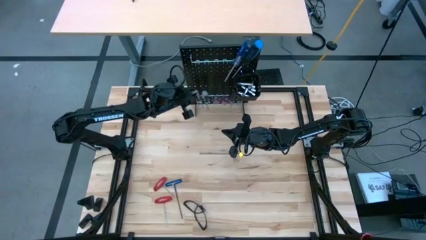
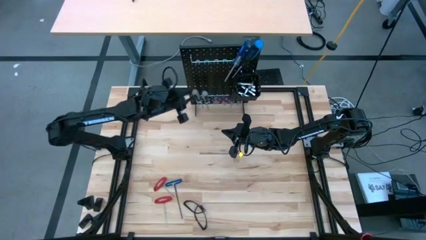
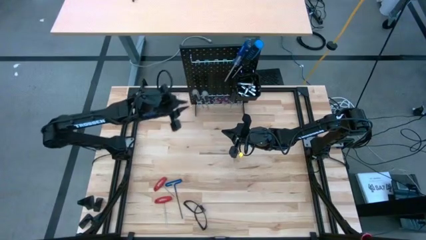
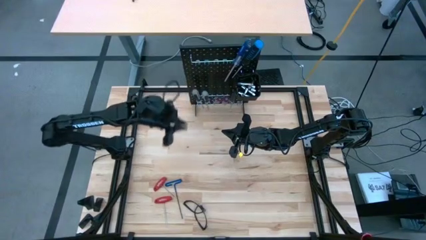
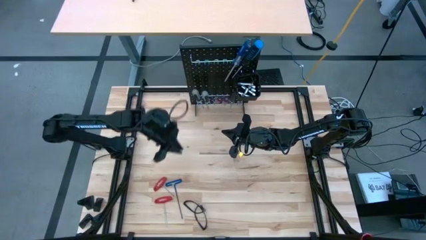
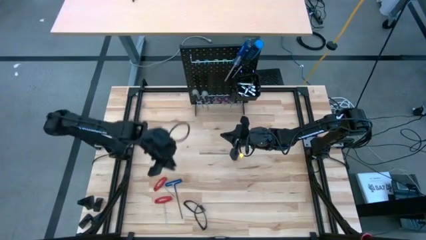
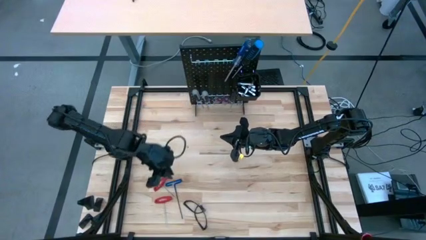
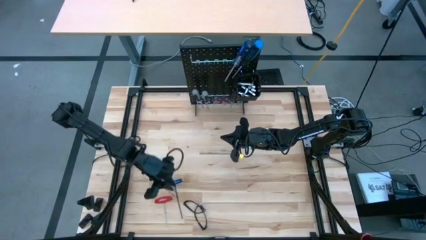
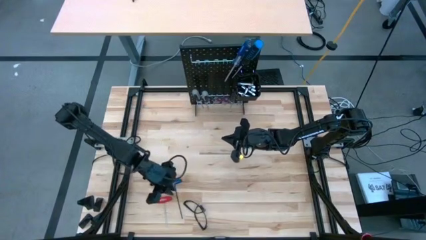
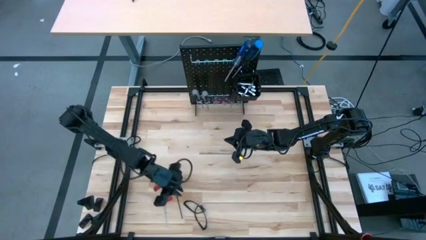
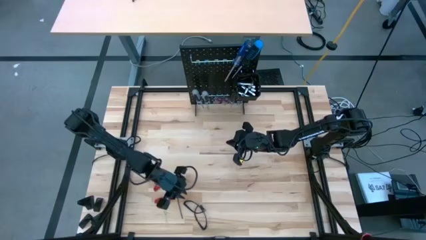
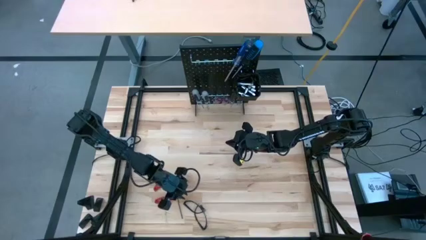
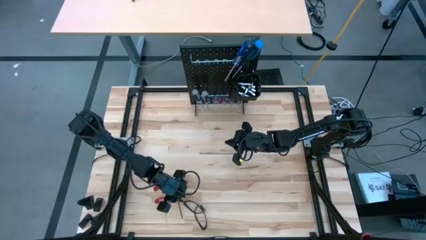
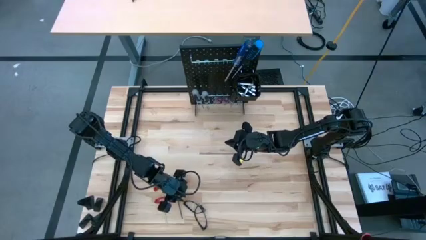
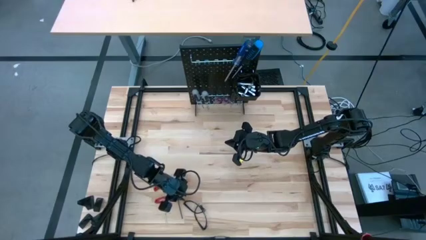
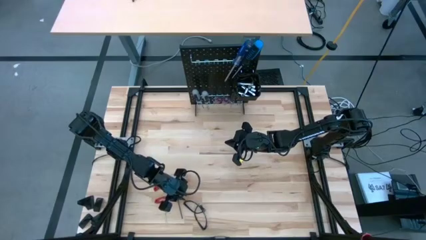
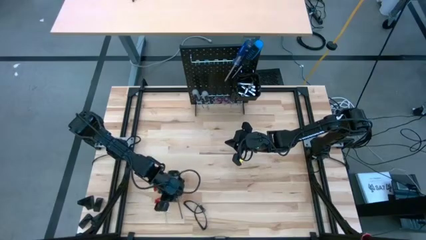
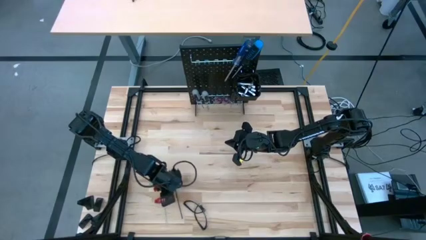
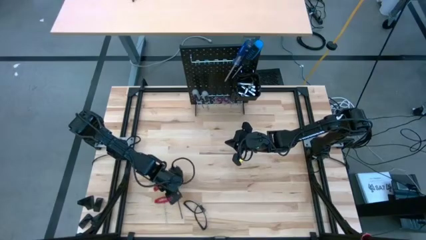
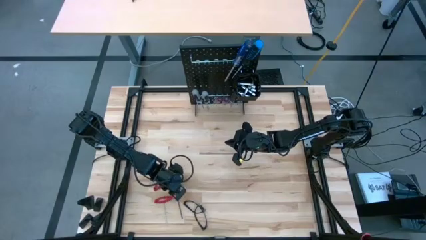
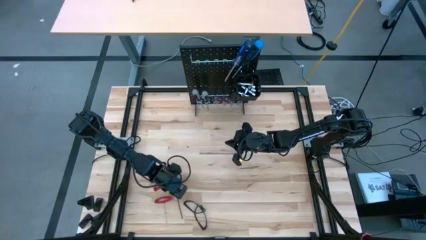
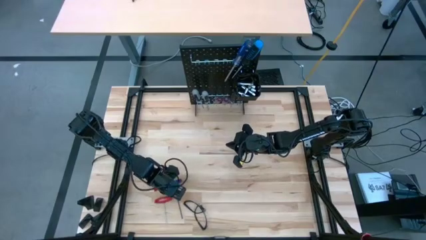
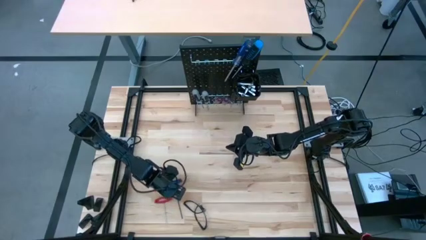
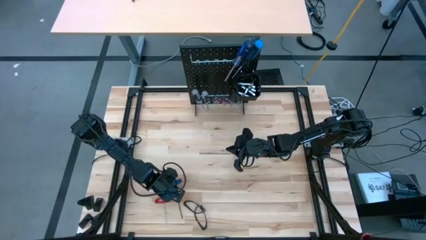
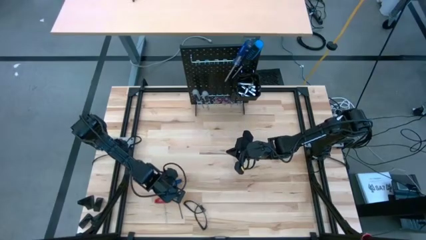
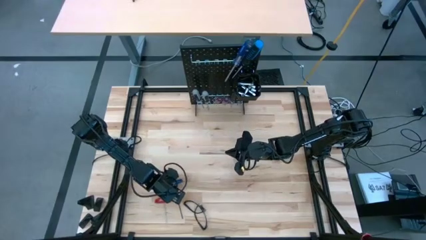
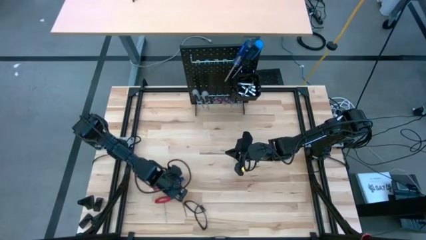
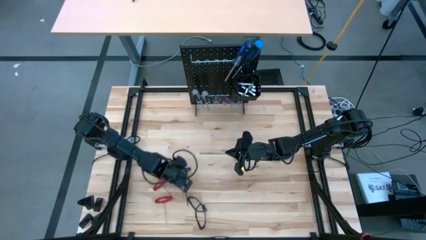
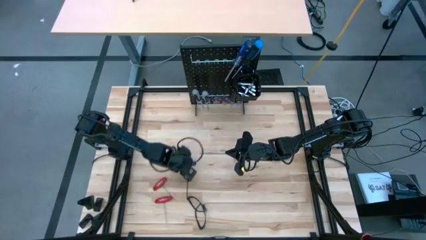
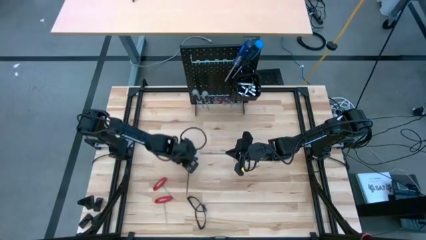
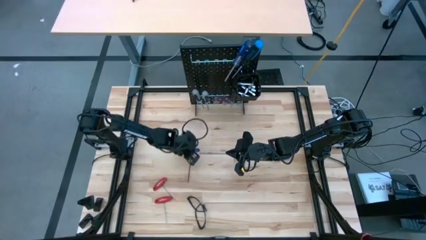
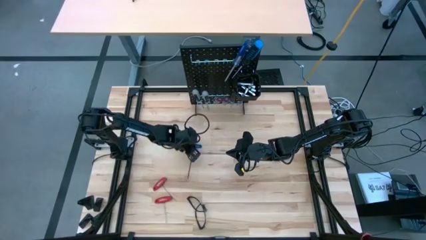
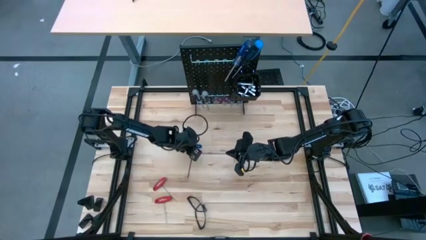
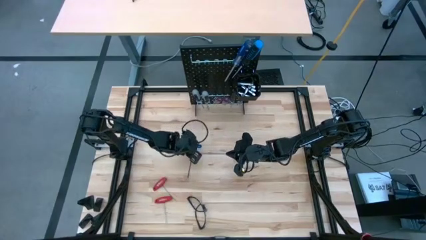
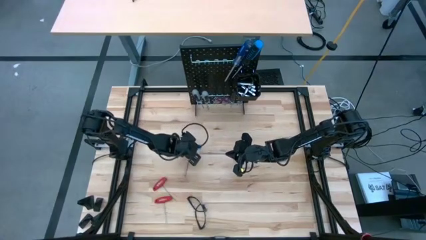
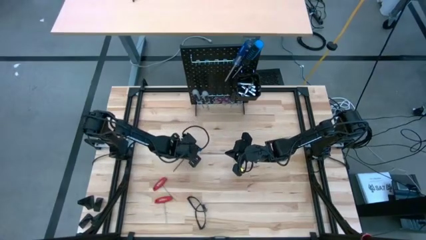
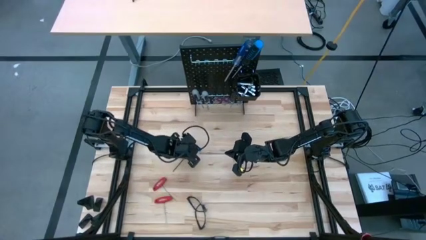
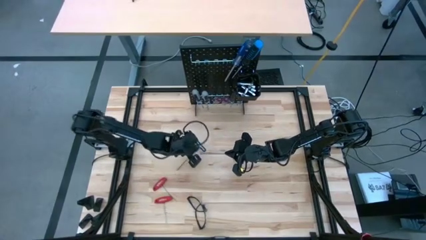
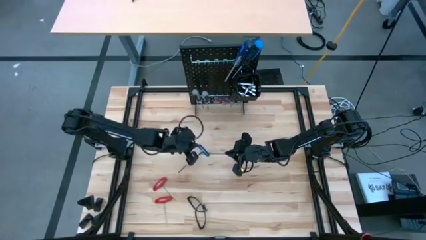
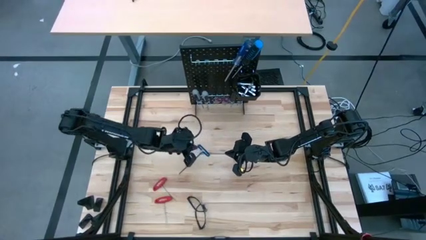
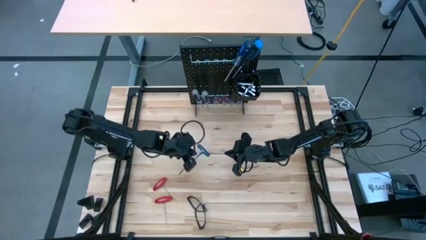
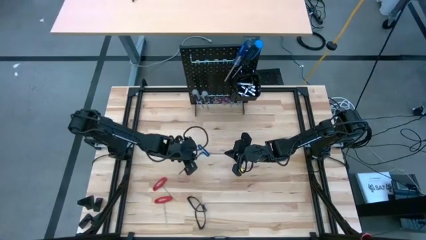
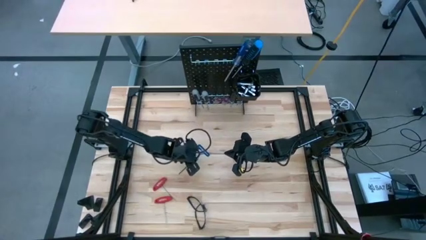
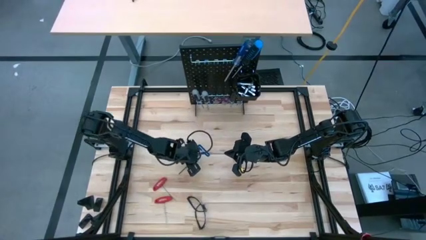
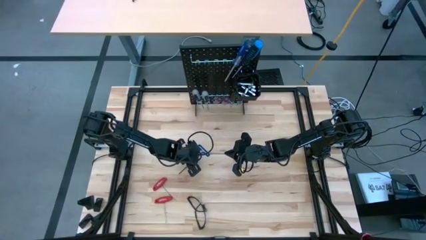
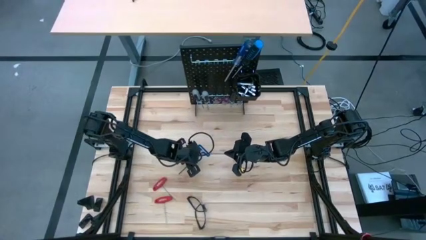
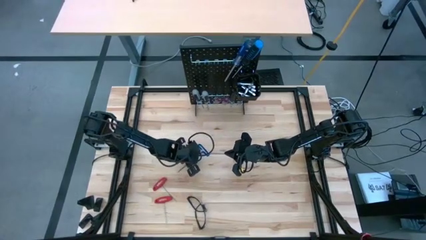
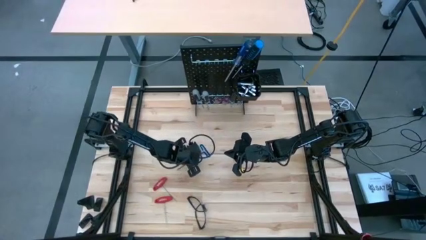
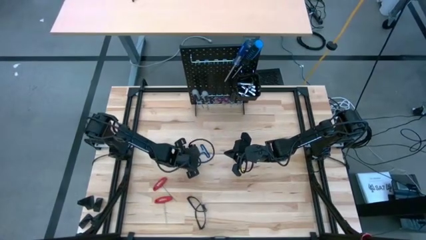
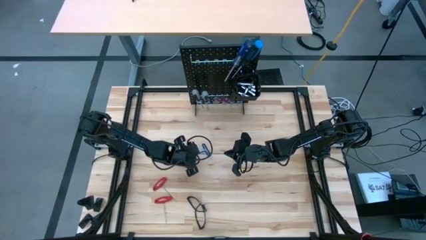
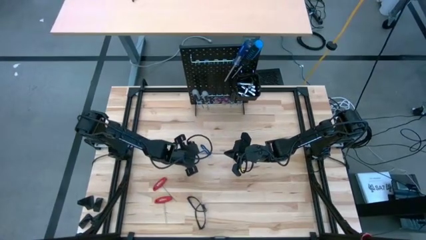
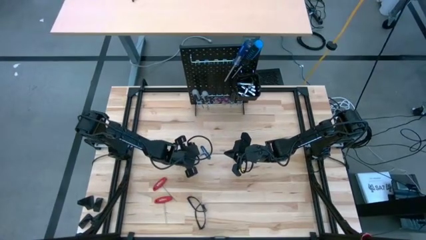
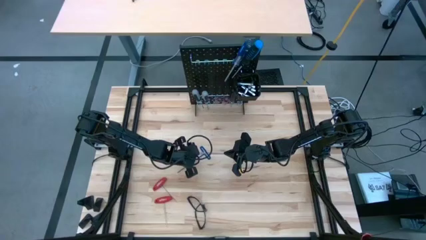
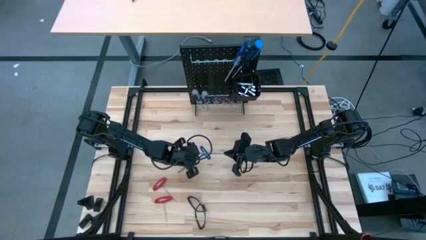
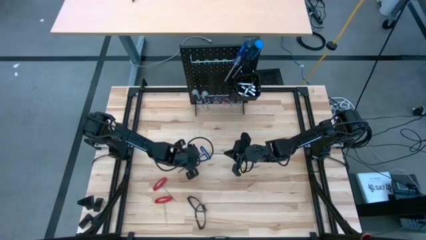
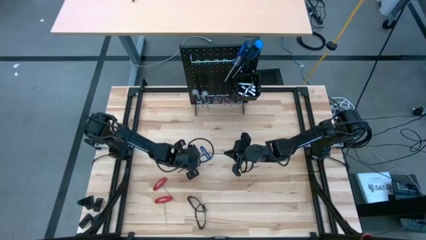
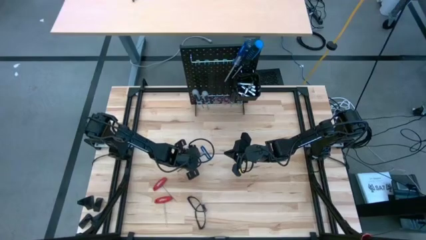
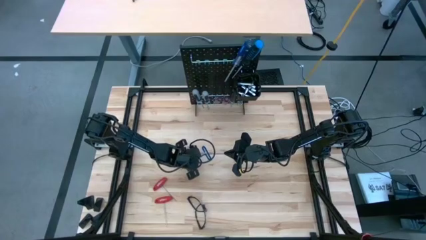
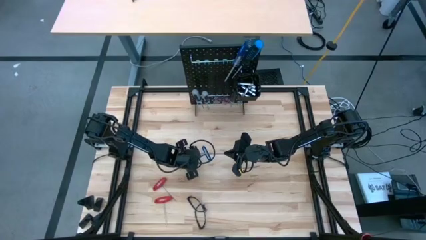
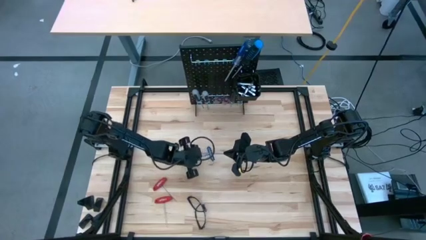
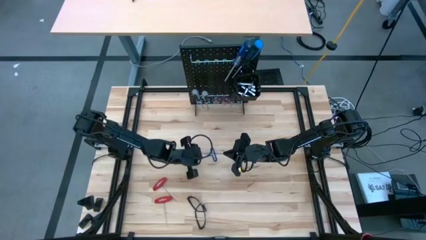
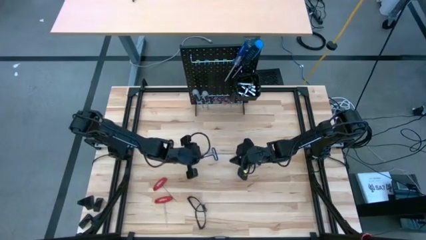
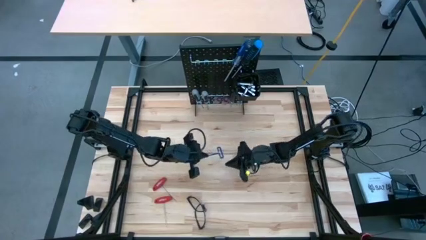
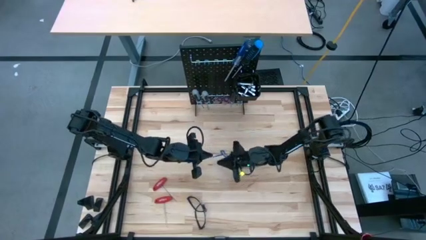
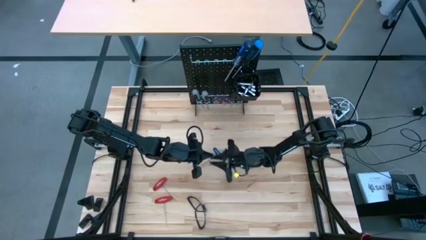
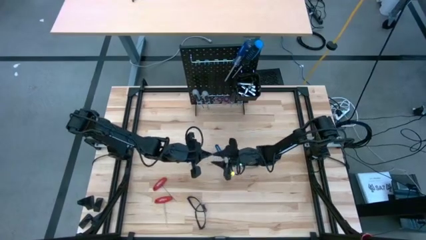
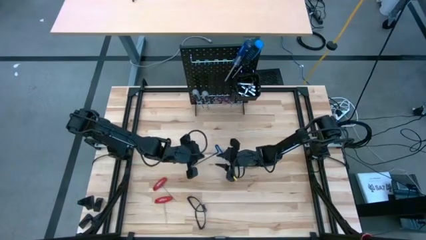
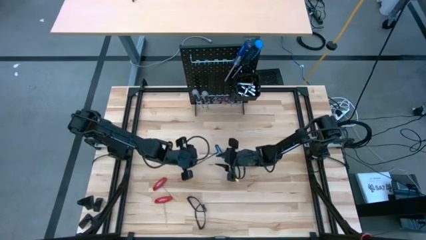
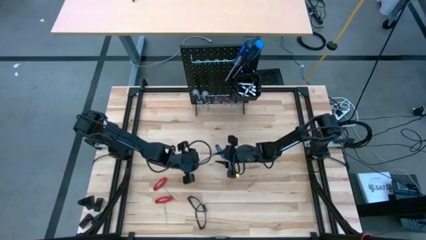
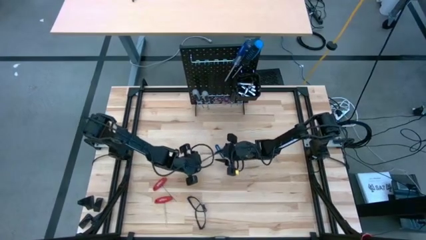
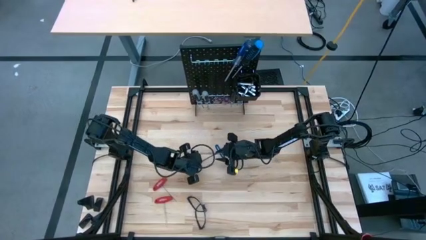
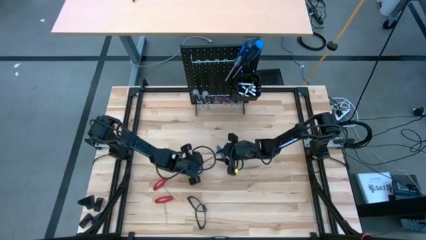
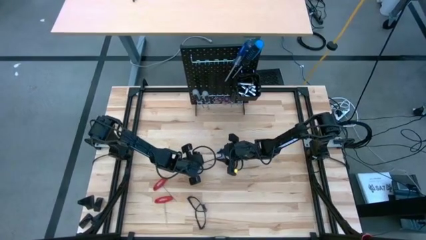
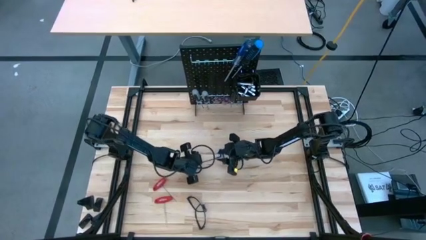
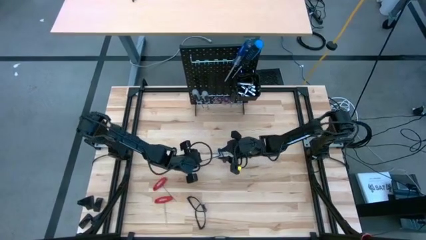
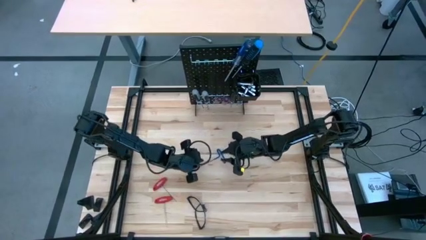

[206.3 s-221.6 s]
Task: Hang tools onto peg board
Hang the pick tool on the pegboard

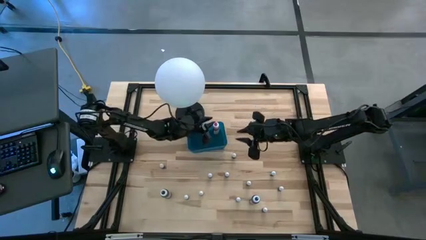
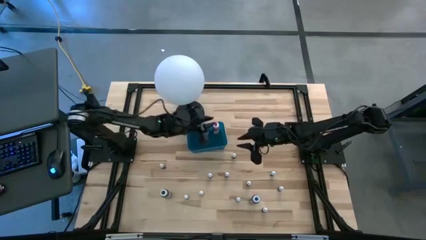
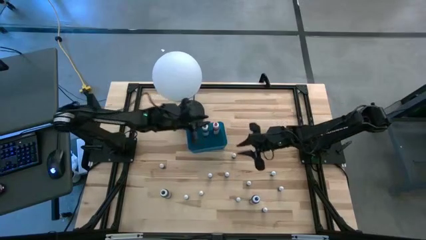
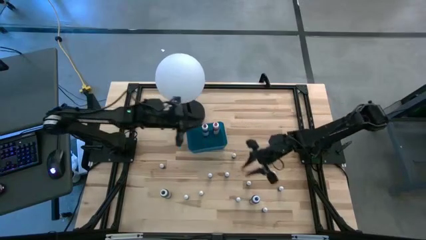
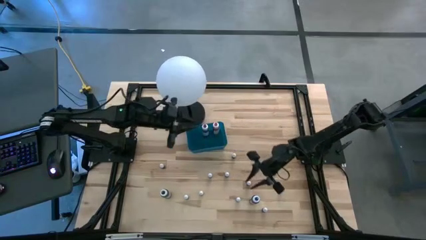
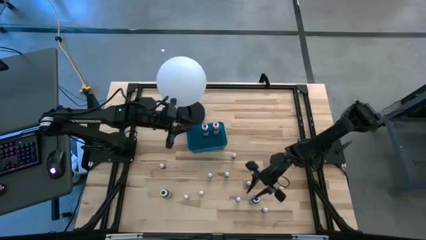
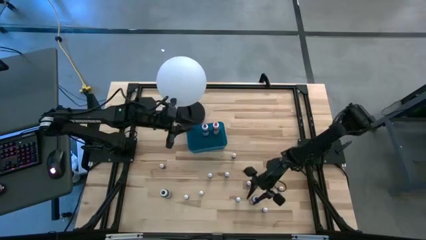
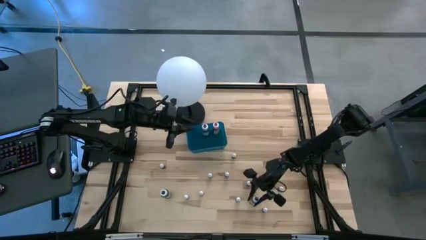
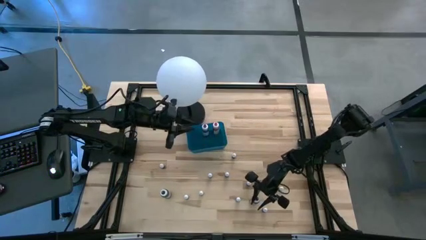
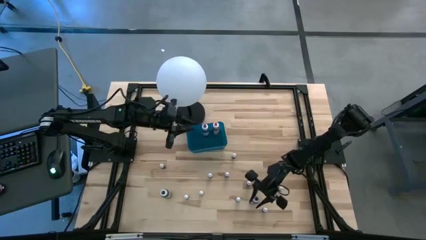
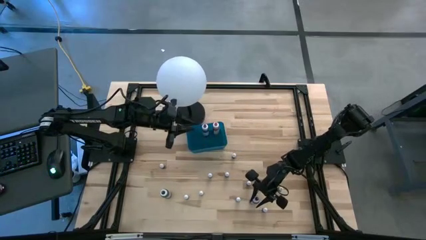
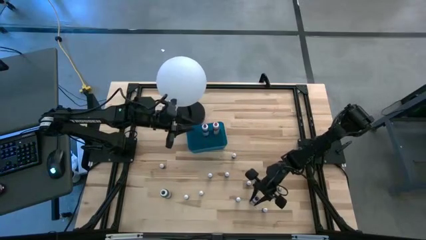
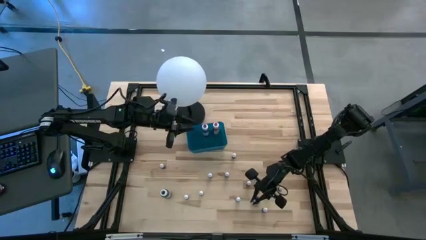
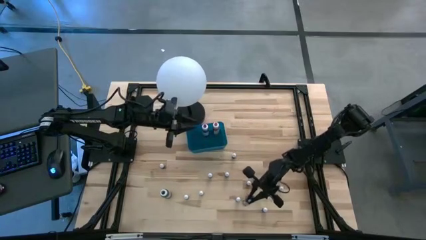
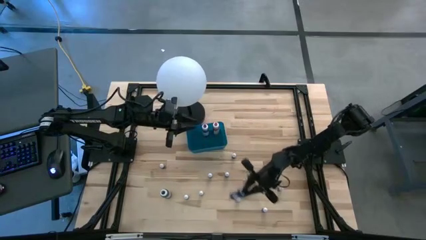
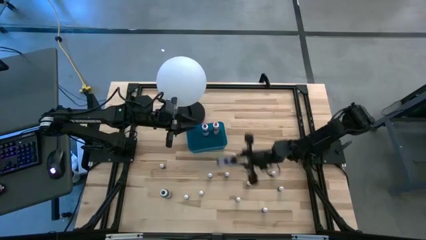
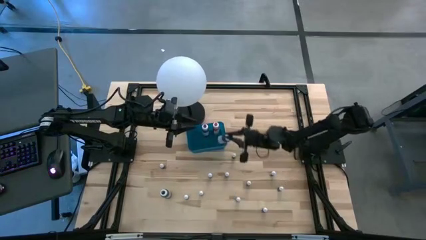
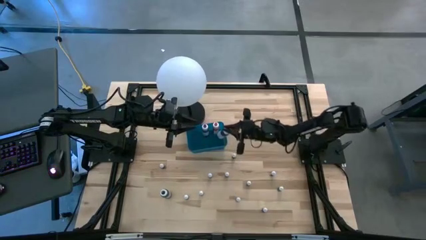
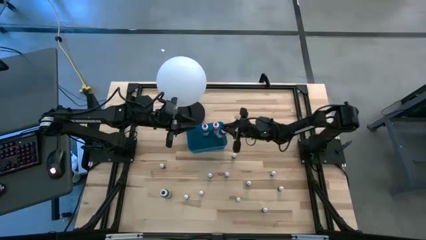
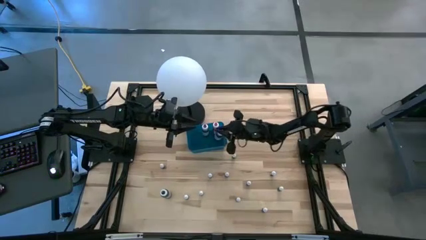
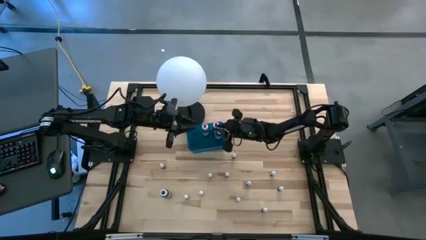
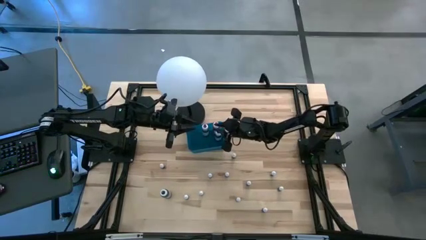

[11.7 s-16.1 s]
Task: Pick & Place food coloring
Put the large blue food coloring bottle into the blue container
